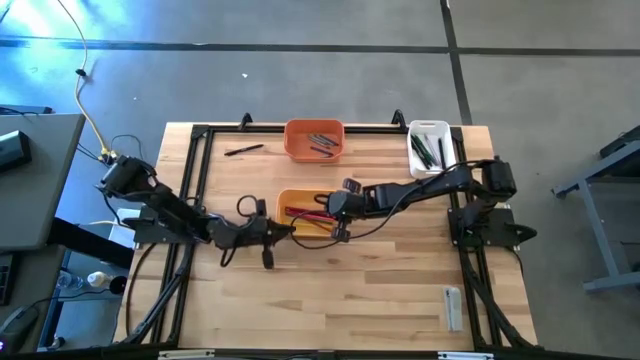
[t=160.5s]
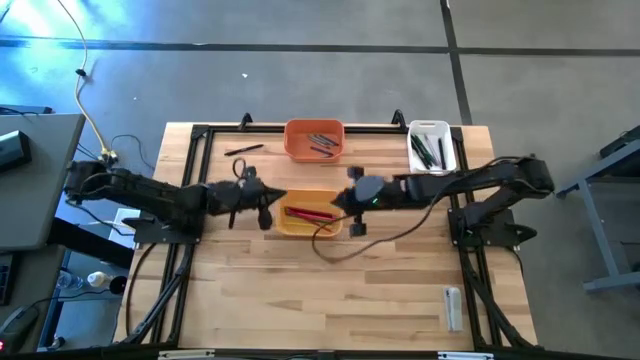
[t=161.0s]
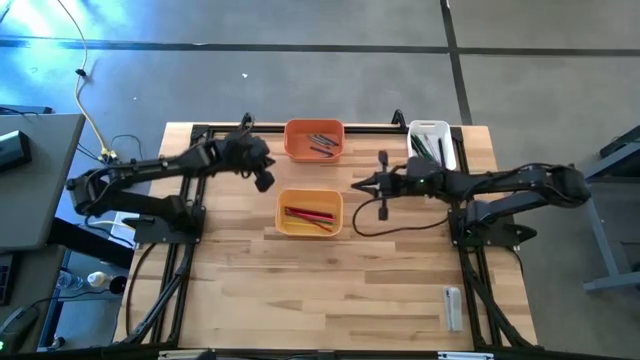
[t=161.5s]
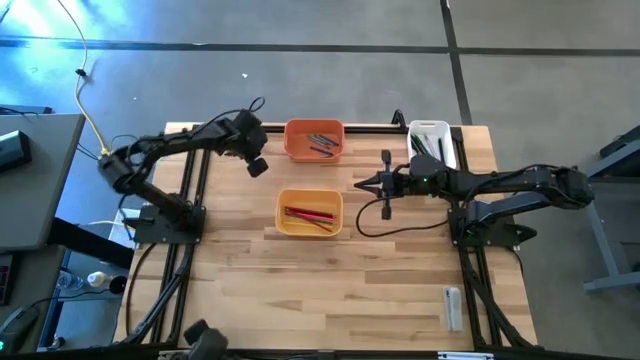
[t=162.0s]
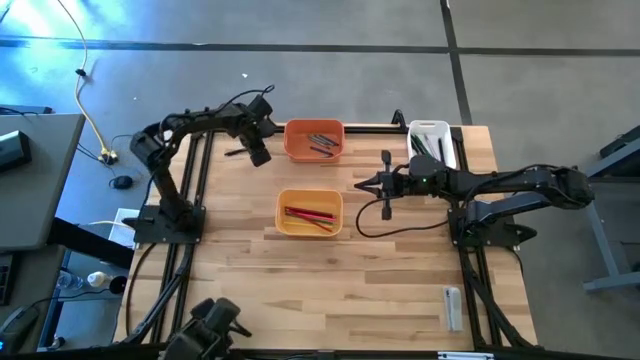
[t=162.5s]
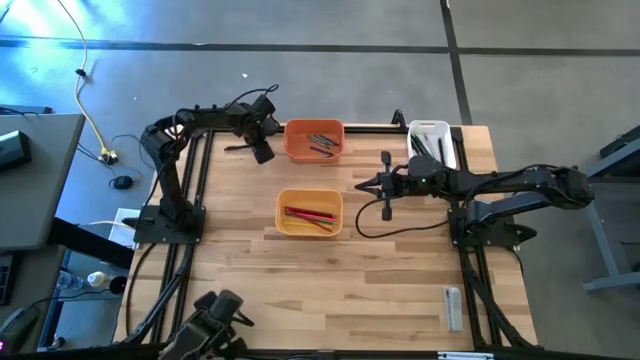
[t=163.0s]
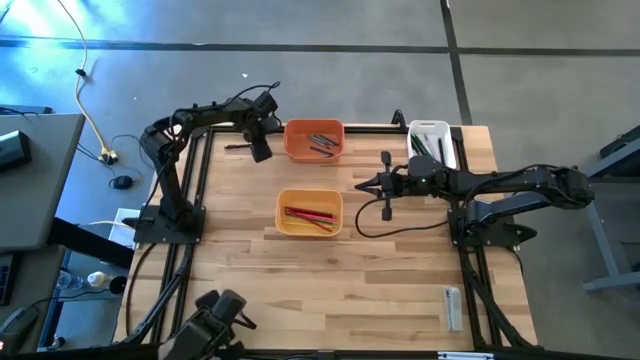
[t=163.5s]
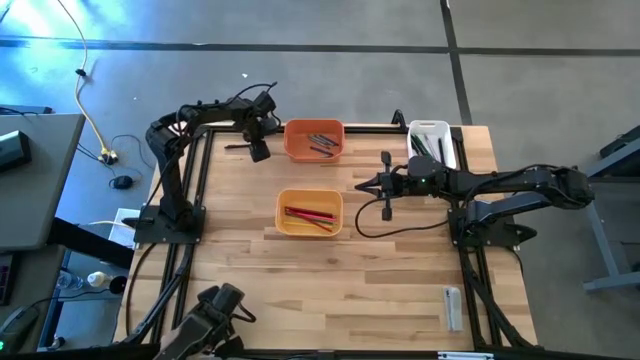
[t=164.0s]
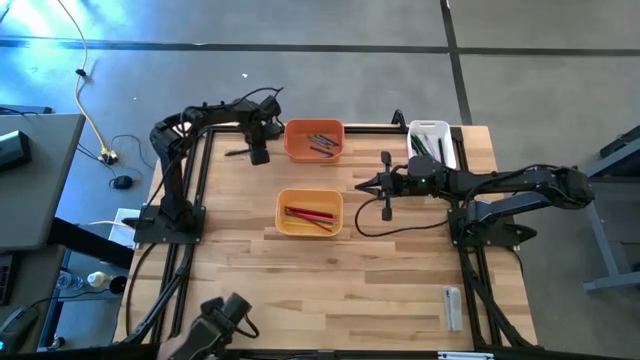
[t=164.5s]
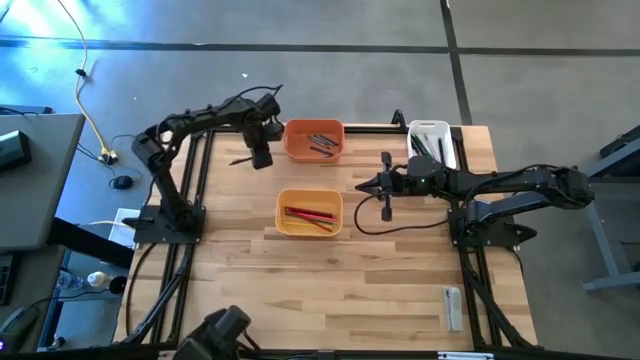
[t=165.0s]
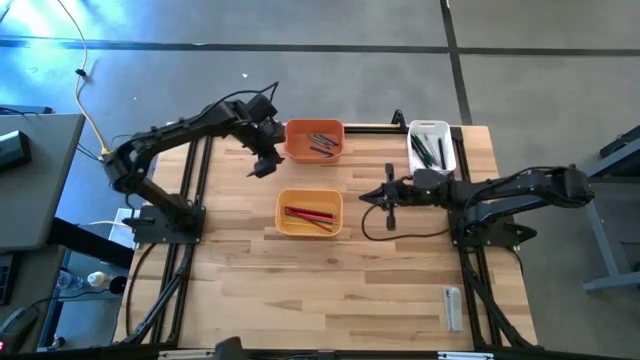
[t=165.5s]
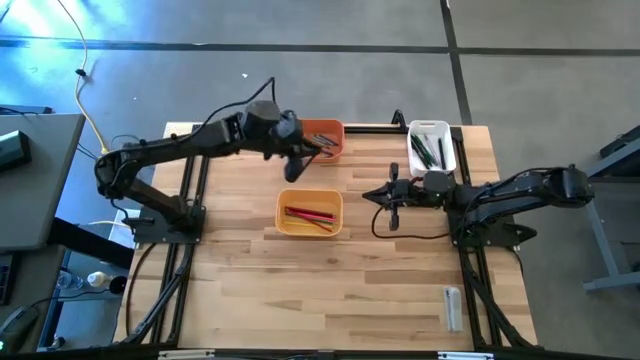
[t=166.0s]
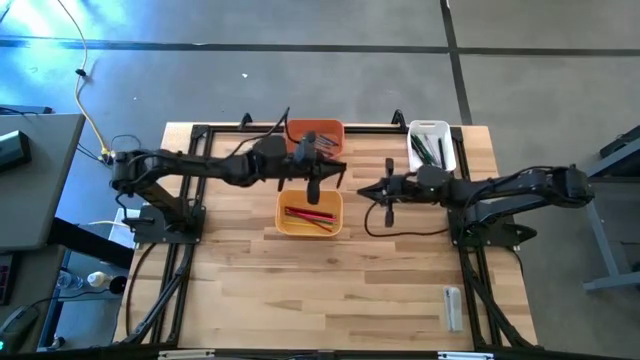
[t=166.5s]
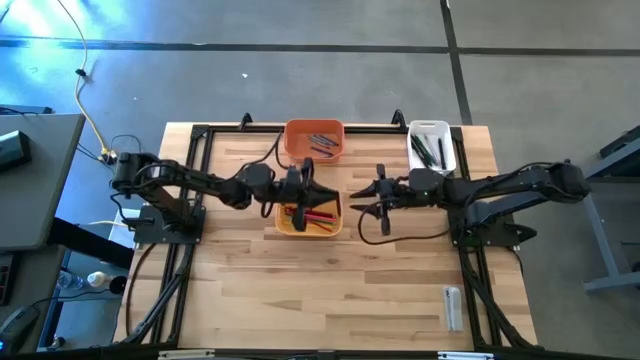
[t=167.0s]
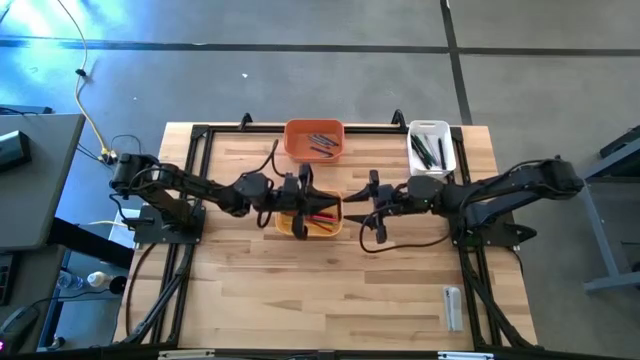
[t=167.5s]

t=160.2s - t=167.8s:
Task: Sort crayons/erasers/pens/pencils in bins
Put the black pen into the white bin

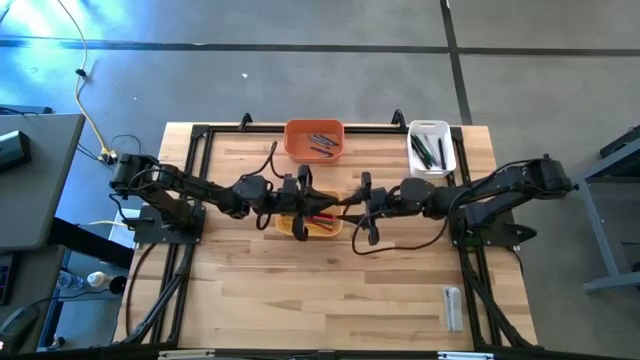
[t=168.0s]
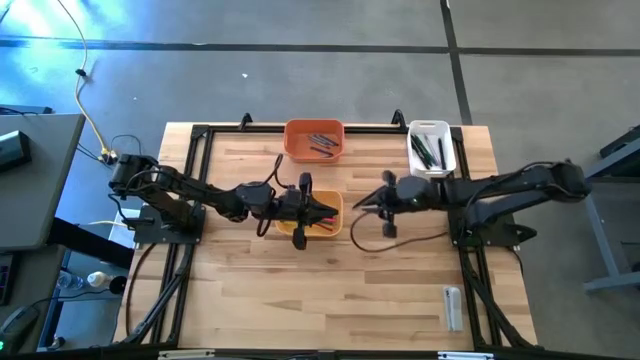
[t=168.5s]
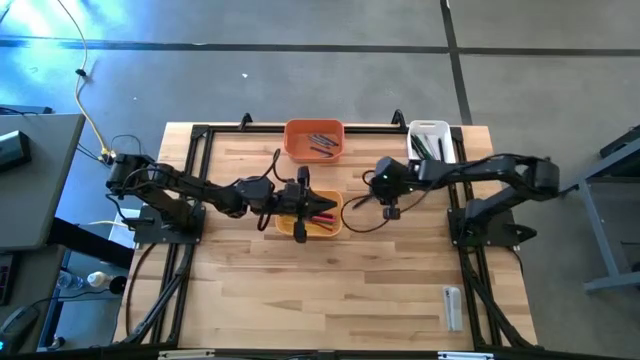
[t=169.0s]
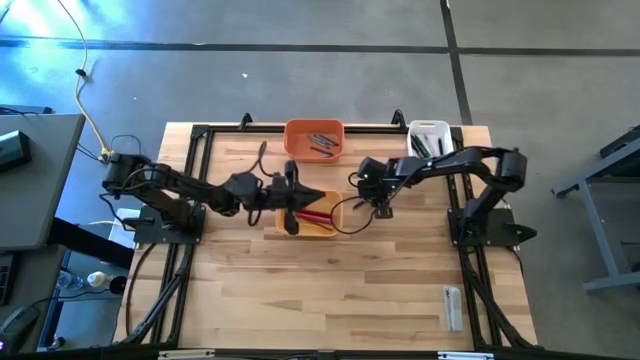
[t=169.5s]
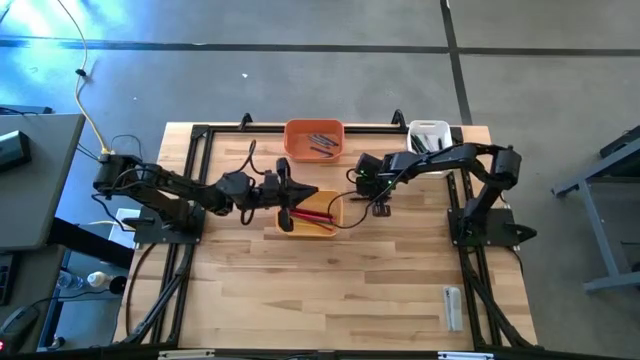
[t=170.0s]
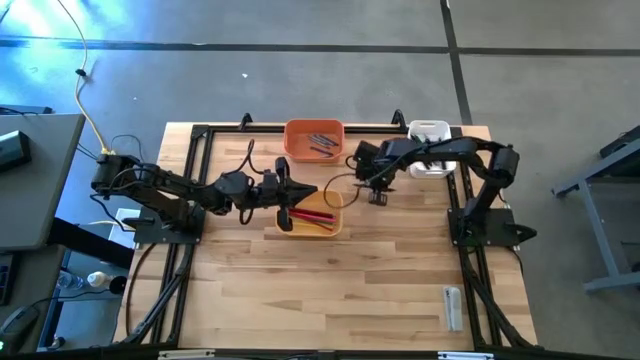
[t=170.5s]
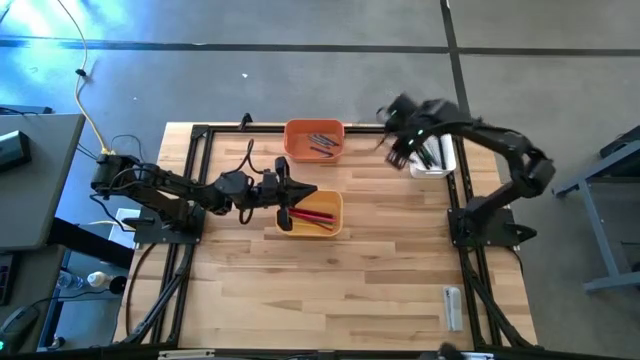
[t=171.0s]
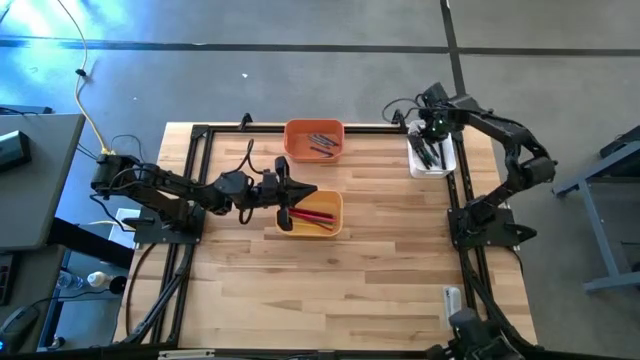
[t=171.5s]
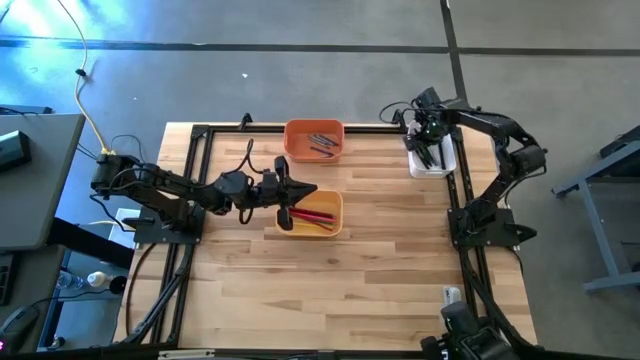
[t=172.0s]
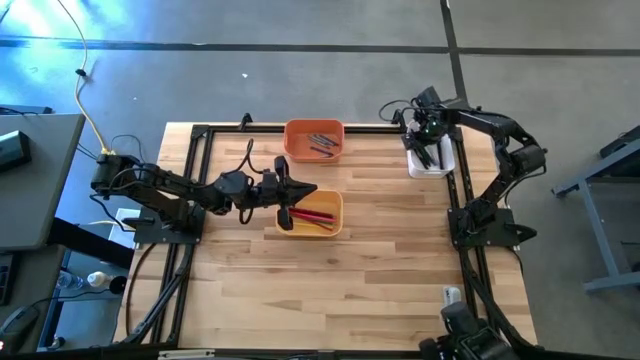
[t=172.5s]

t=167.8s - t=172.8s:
Put the black pen into the white bin

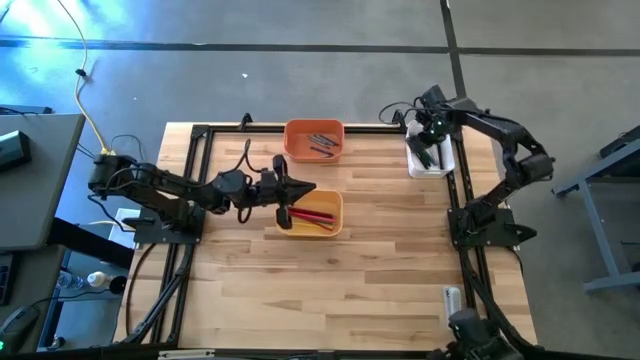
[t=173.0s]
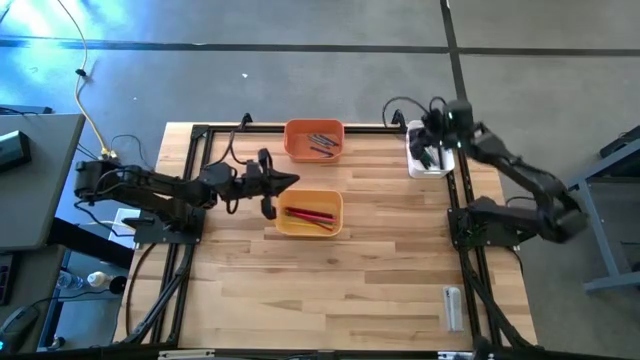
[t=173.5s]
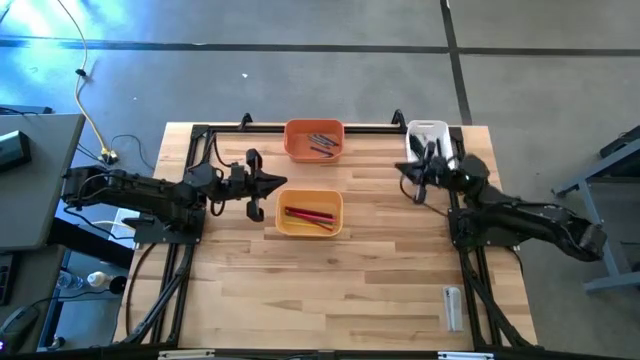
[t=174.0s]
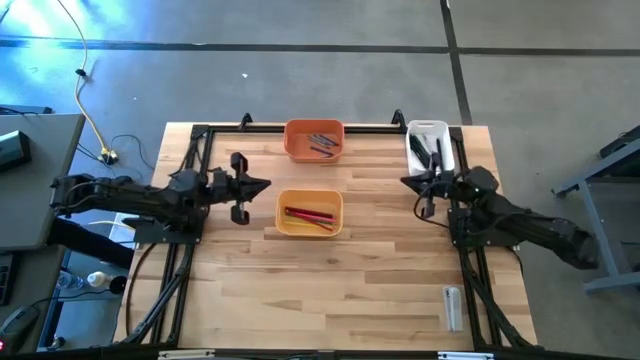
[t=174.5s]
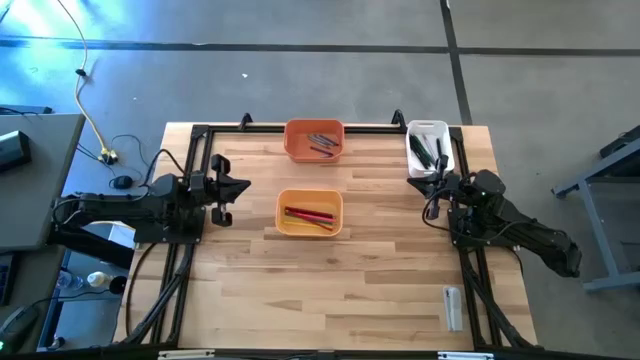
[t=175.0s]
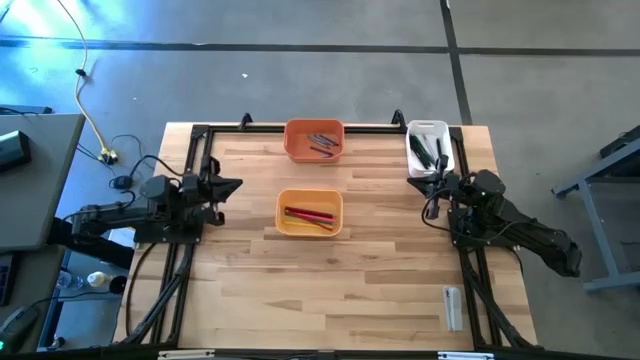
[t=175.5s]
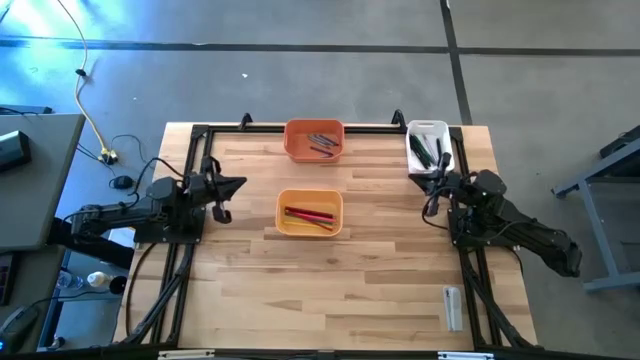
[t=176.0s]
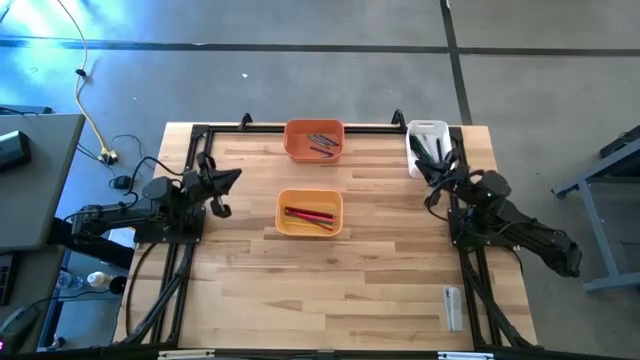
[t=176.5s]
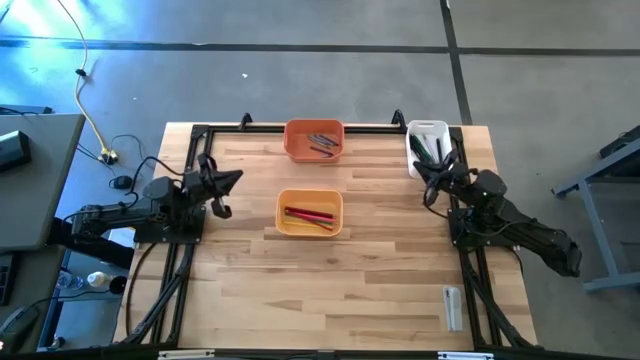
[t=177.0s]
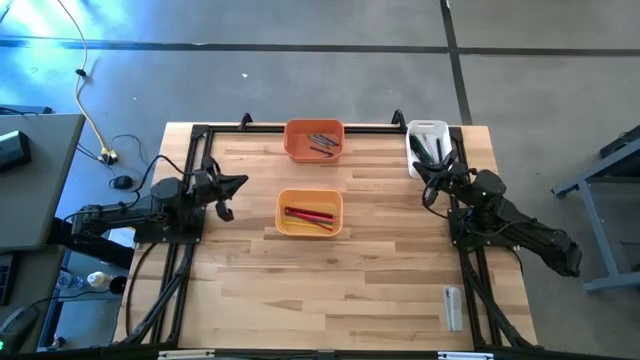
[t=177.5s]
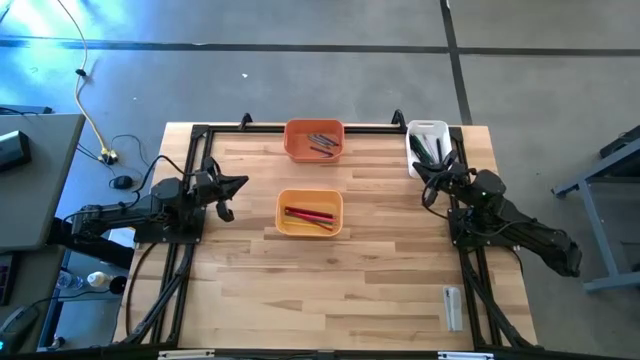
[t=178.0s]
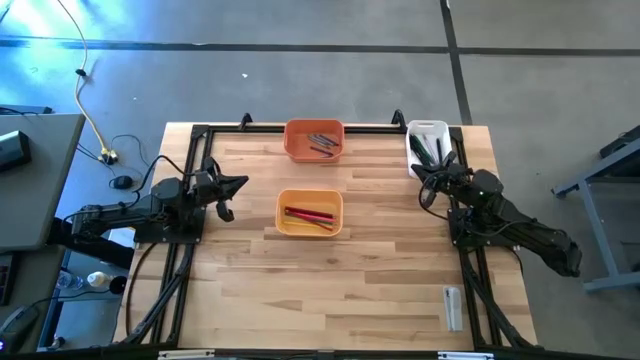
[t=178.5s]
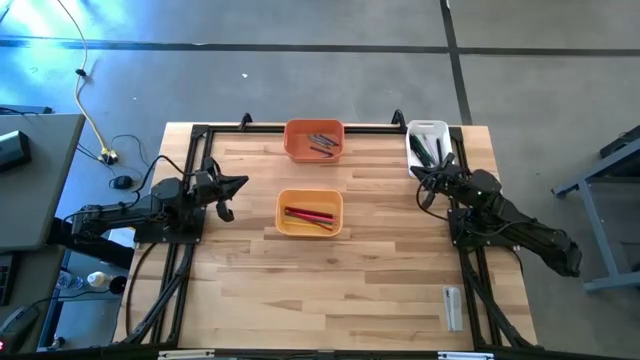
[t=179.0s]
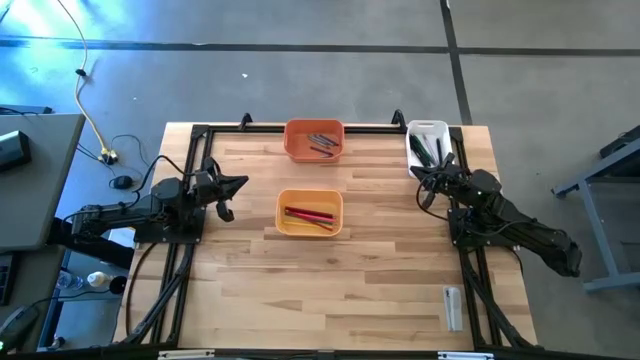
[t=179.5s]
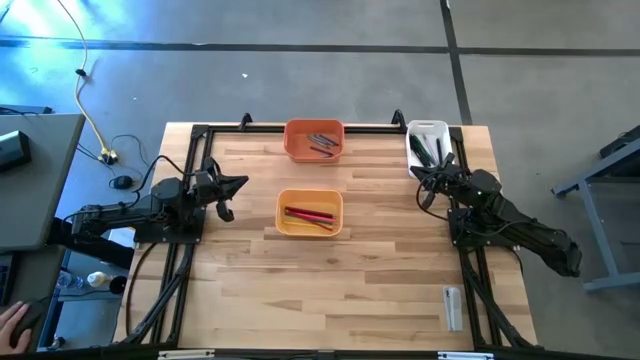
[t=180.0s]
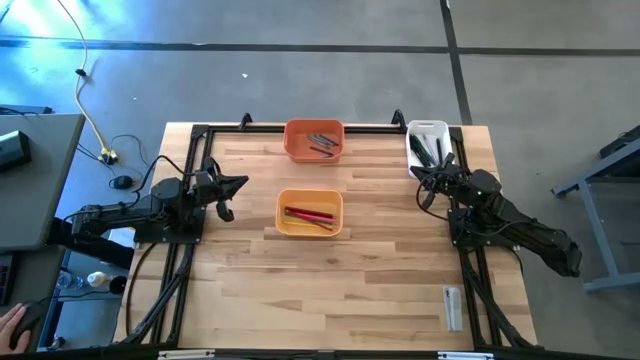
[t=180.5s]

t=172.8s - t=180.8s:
Return to Home Position
